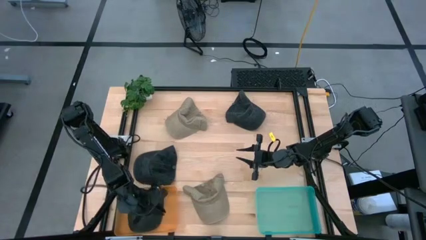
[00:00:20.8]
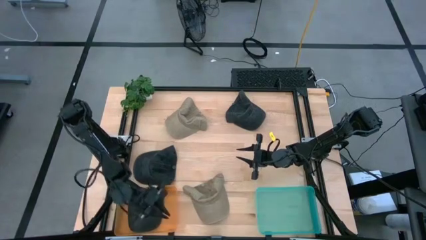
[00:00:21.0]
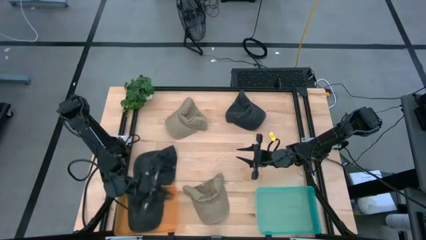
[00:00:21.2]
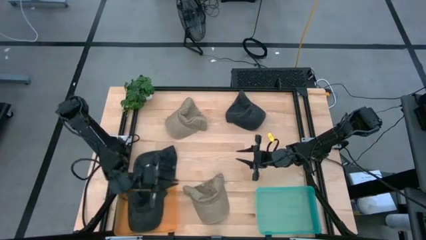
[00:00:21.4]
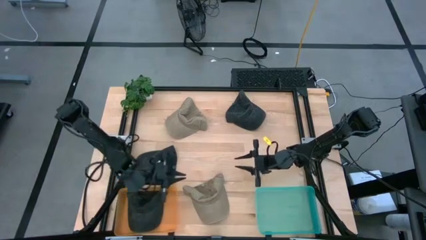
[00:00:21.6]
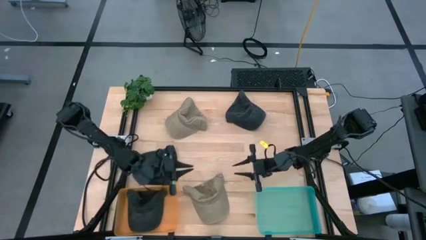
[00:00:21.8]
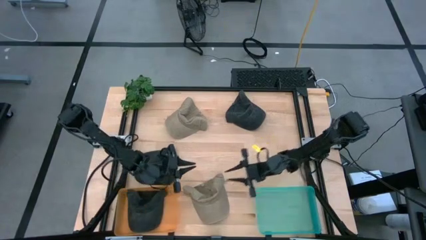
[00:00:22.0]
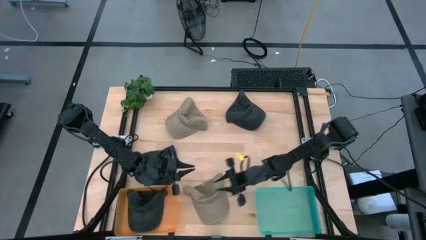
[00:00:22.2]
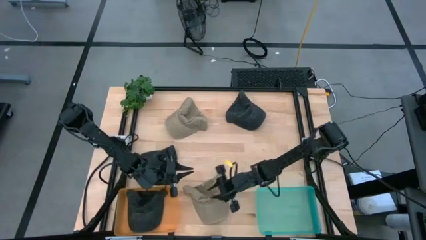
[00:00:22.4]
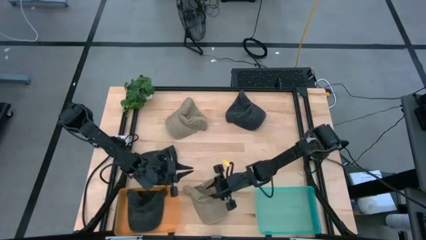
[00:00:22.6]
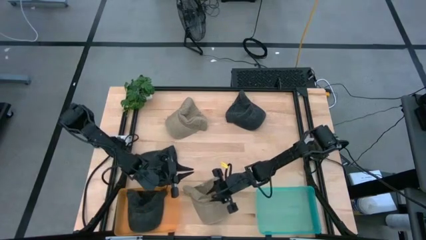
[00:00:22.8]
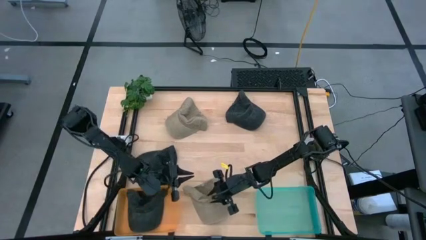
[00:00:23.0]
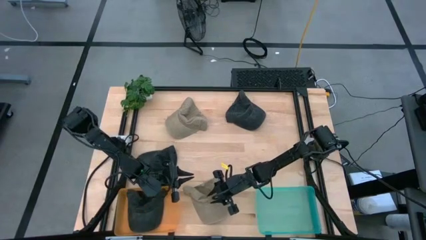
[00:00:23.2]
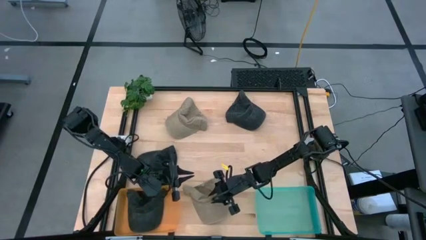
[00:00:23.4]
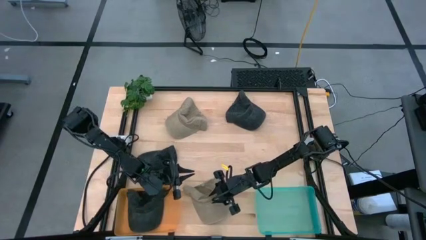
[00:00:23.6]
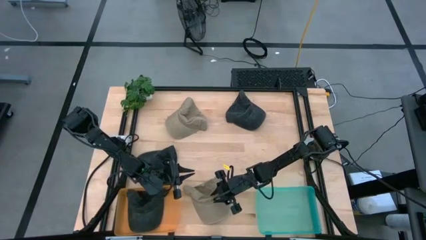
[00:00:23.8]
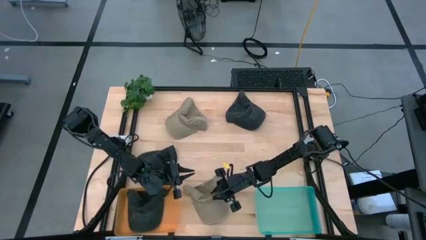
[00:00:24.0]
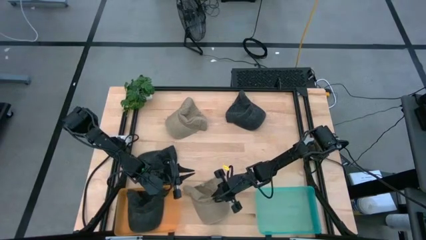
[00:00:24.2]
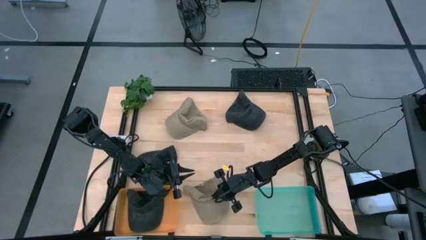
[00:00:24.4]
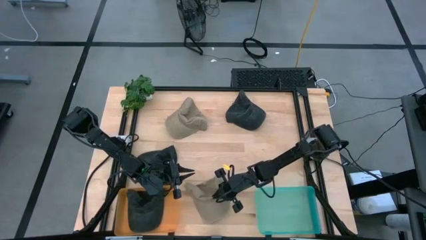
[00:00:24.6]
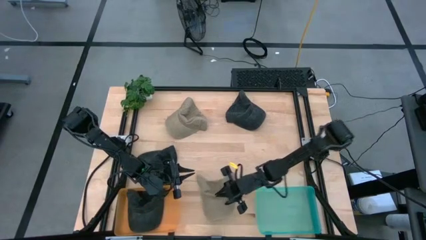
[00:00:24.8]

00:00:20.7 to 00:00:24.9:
Task: Pick & Place hat
Put the bottom brown cap into the blue bin

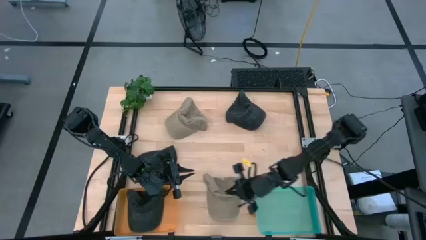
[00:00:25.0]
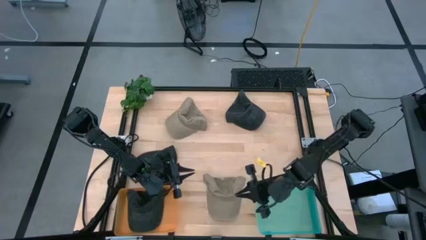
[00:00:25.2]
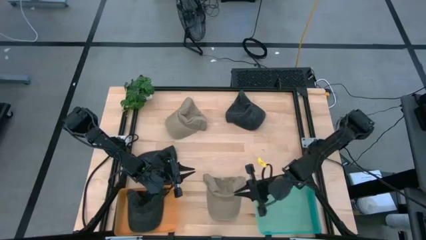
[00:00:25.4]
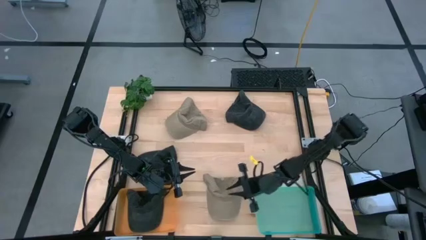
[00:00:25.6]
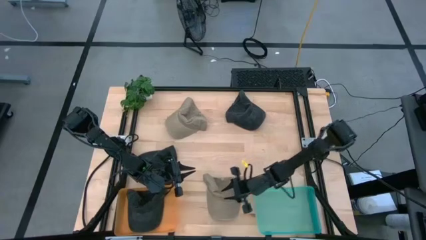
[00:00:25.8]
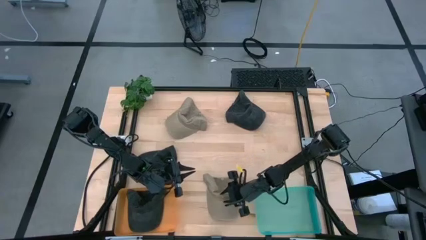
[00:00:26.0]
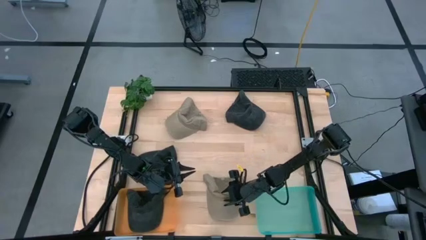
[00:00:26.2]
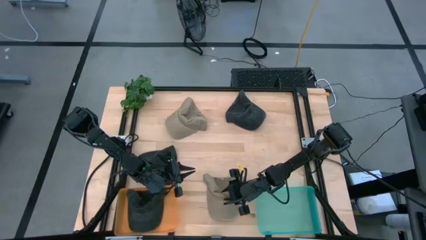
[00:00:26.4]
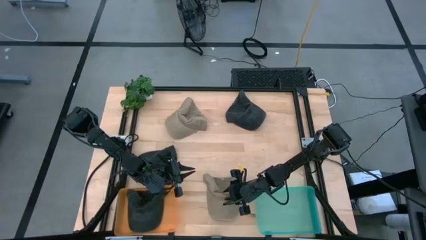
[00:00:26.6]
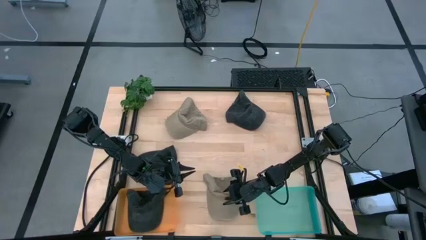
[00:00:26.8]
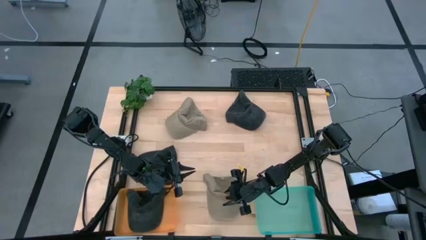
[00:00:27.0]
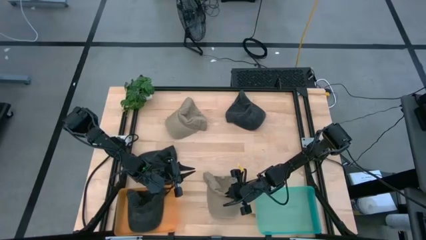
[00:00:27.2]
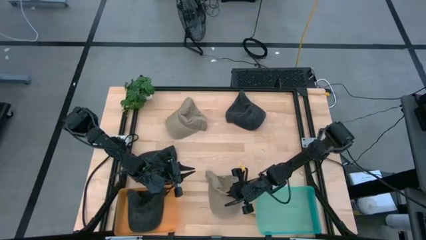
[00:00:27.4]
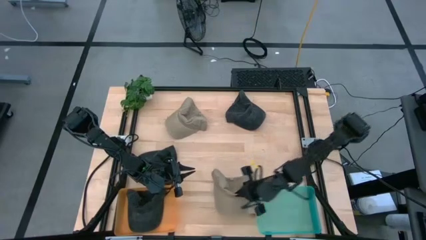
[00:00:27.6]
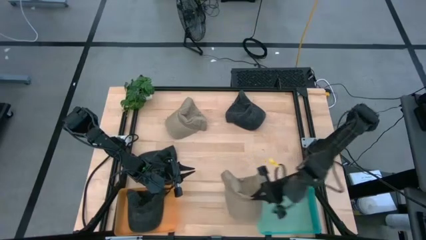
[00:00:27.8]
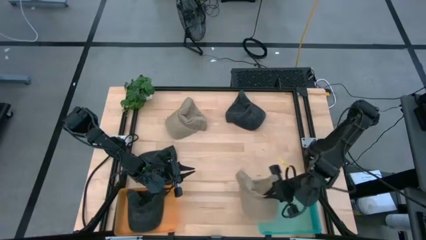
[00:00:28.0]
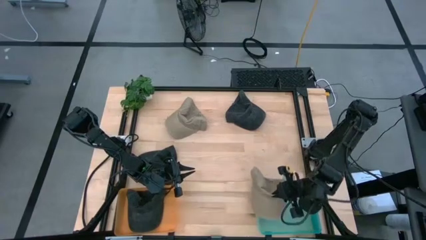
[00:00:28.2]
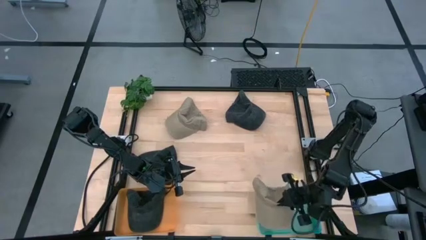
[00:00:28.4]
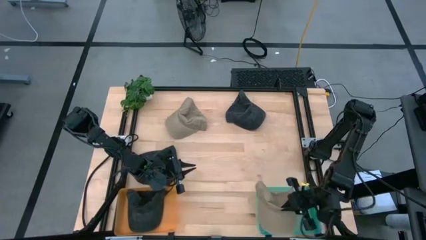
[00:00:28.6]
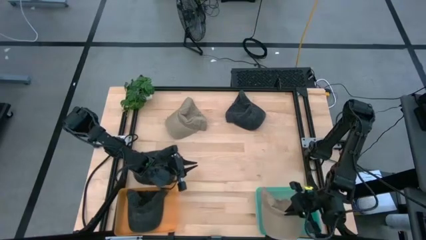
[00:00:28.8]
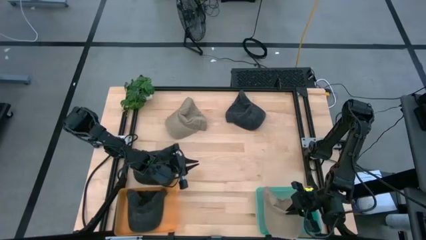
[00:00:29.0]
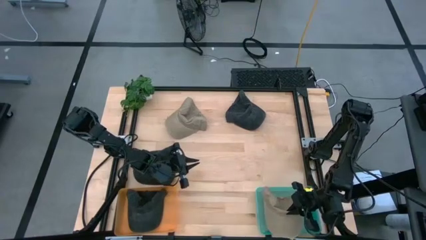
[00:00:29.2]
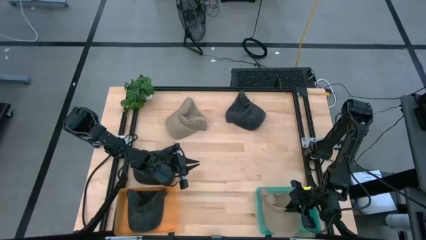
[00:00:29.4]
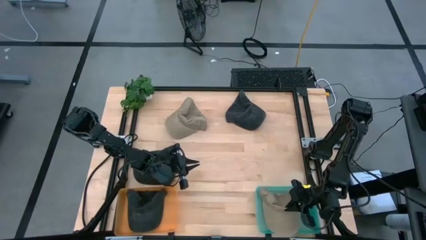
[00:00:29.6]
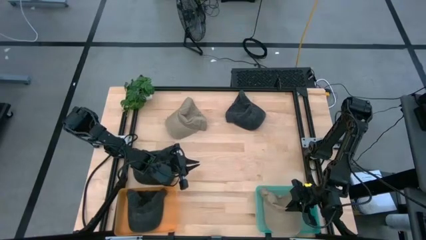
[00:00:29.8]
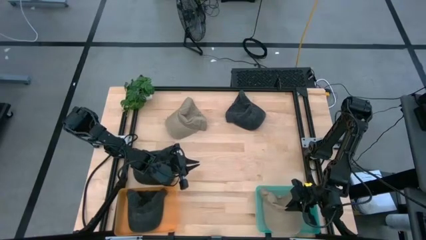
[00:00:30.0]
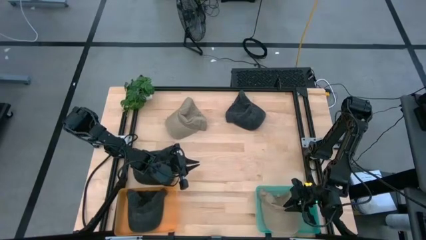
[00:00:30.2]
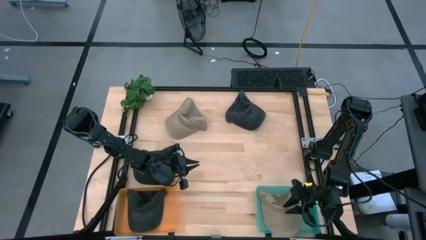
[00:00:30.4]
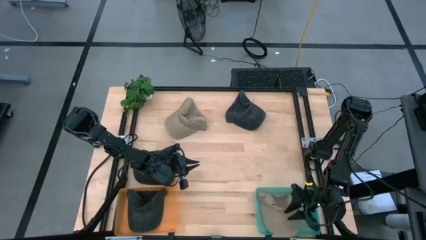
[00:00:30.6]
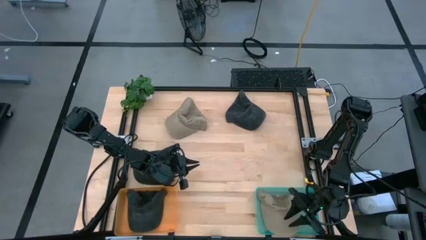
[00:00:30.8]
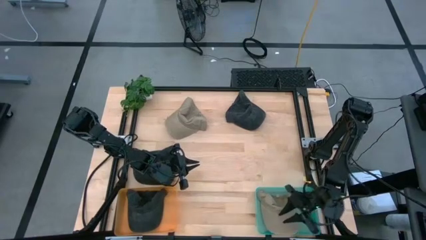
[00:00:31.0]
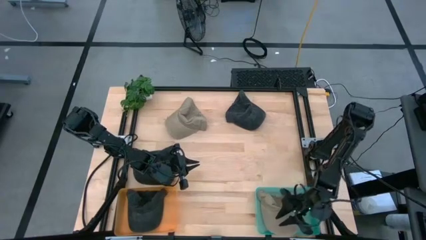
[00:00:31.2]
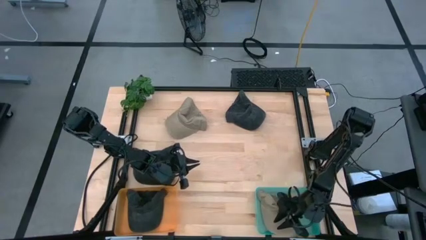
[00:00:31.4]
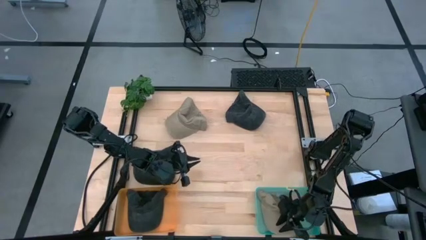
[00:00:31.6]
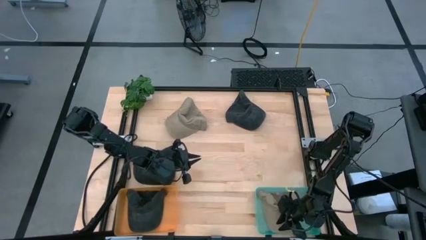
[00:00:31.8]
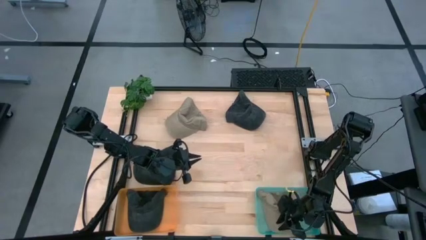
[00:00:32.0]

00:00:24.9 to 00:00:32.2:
Put the bottom brown cap into the blue bin

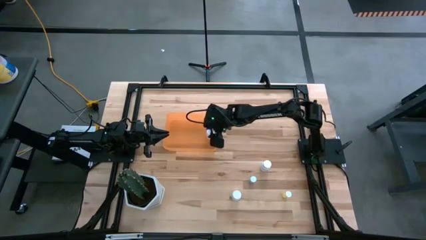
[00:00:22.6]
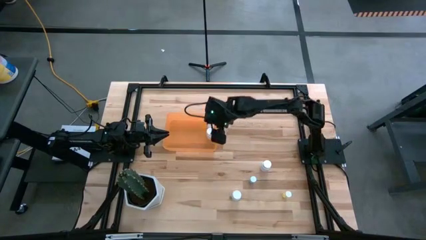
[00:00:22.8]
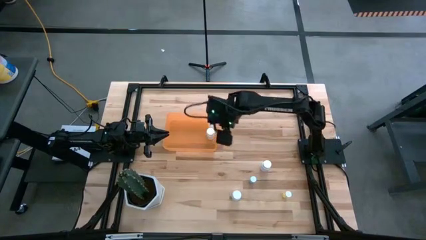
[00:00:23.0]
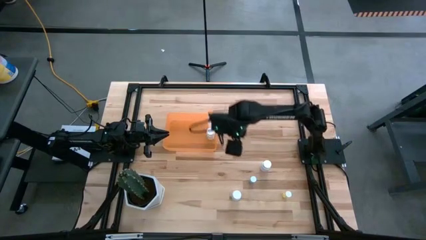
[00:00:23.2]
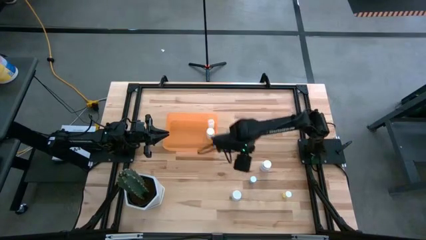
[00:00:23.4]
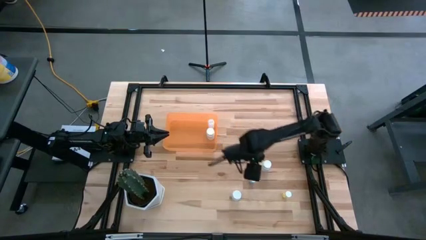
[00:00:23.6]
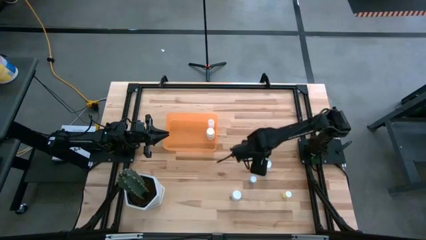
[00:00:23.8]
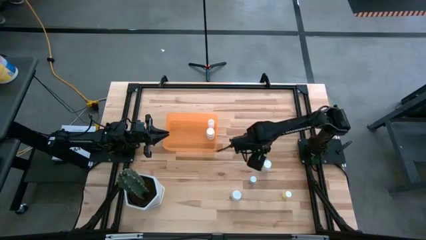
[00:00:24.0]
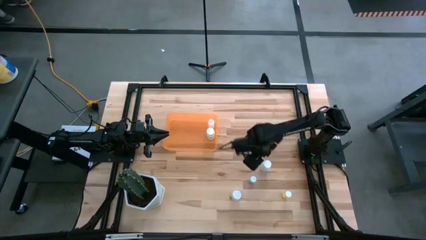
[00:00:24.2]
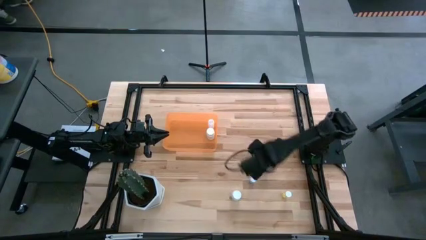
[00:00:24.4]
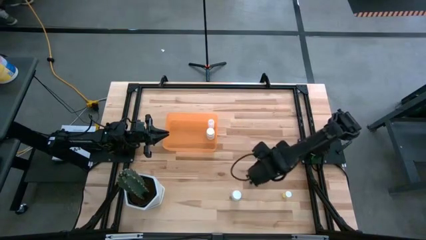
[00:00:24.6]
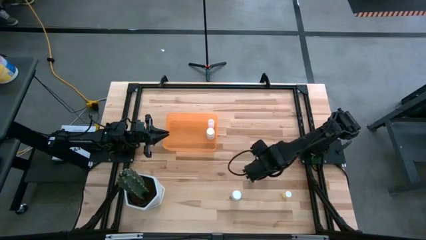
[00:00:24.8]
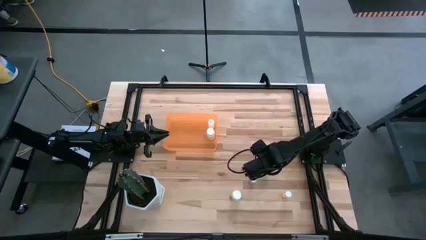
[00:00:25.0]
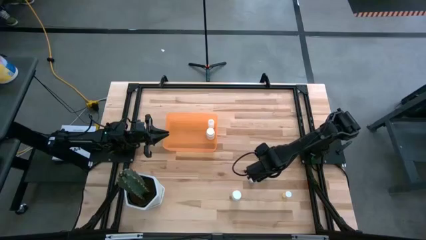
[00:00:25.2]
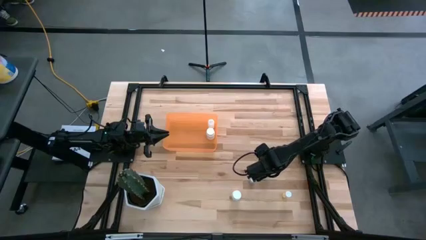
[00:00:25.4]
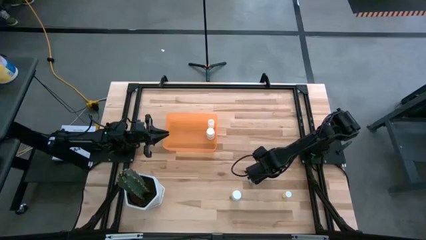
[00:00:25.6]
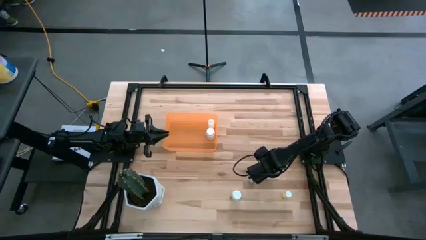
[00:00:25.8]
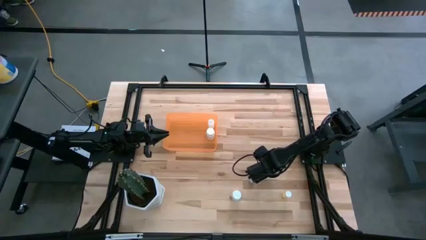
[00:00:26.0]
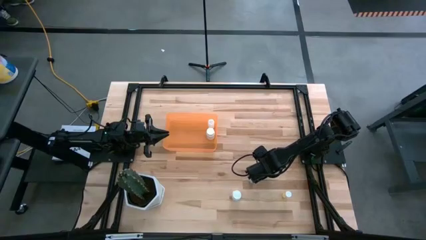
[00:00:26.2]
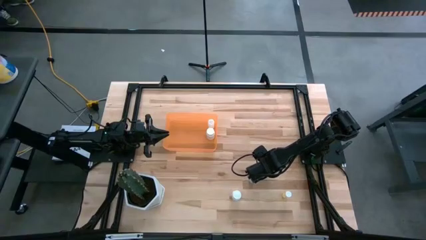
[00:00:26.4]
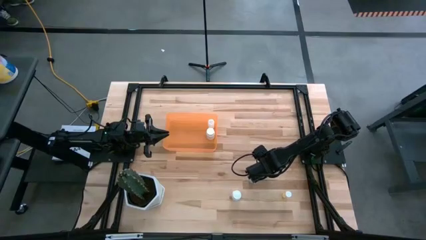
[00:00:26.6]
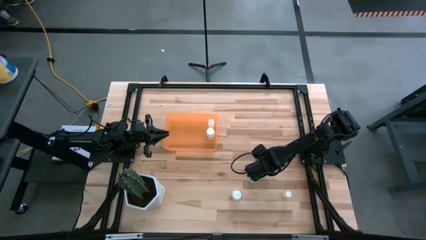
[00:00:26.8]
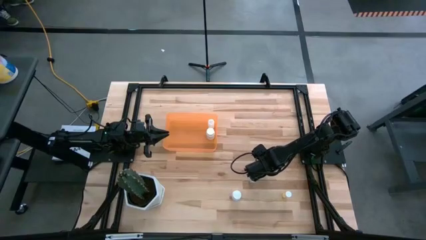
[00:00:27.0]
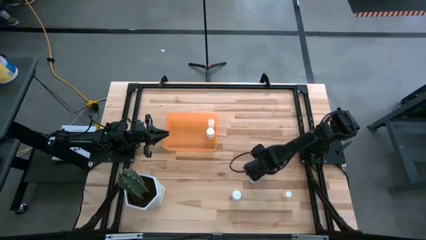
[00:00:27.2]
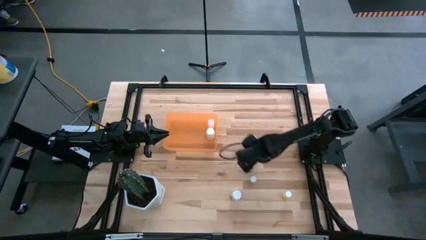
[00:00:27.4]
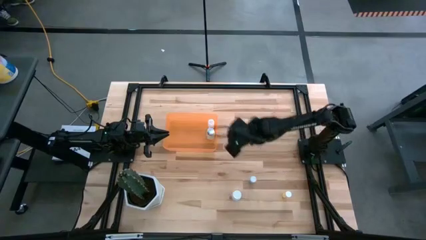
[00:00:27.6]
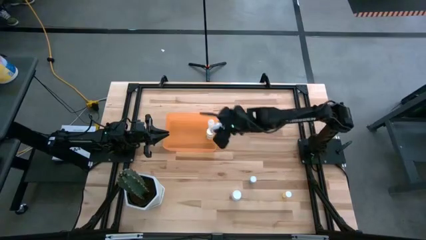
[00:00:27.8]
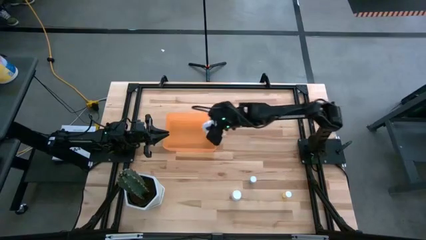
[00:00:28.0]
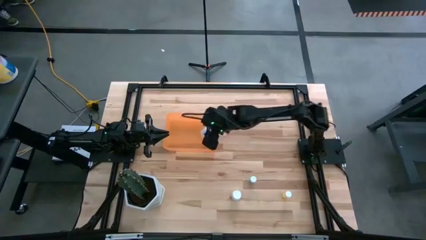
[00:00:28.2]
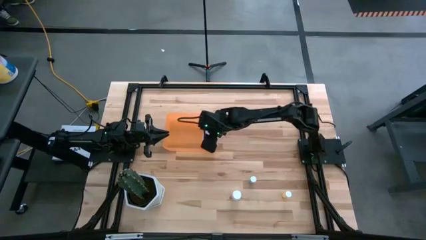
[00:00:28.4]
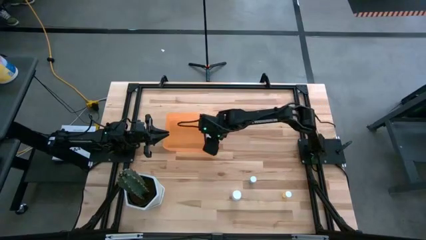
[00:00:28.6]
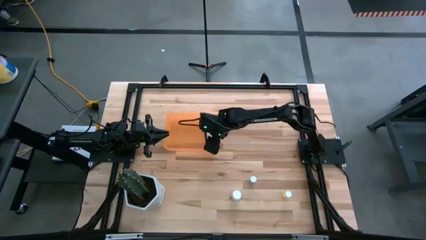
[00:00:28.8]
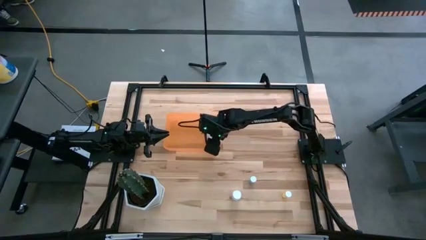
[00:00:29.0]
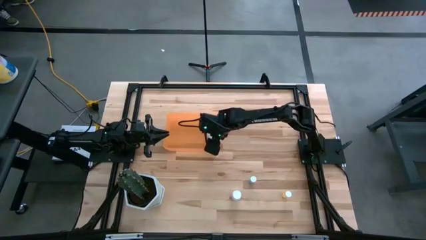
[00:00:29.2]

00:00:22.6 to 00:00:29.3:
Task: Pick and place pill bottles into a basket
Put the top white pill bottle in the orange bin
